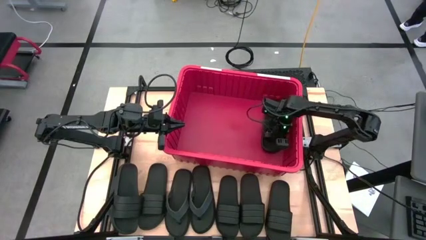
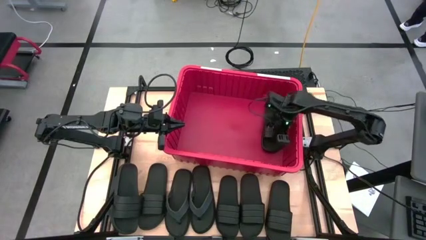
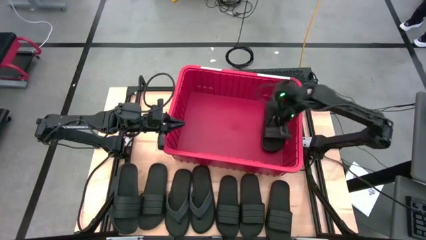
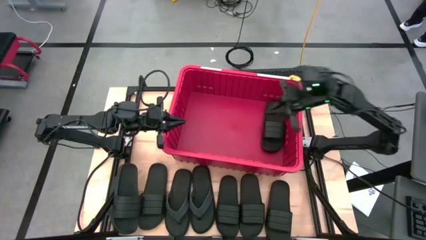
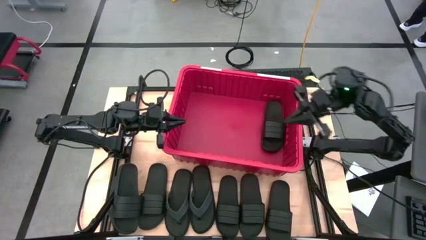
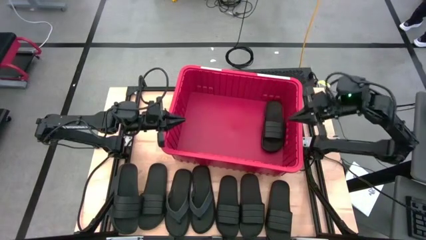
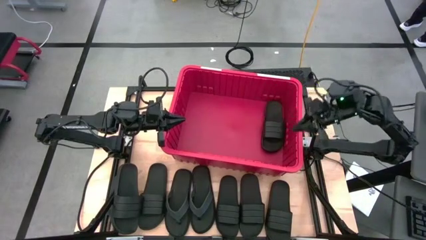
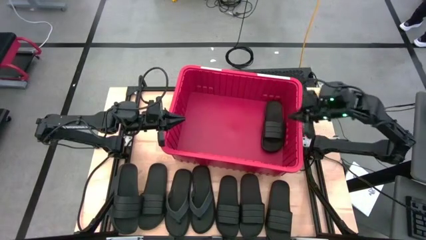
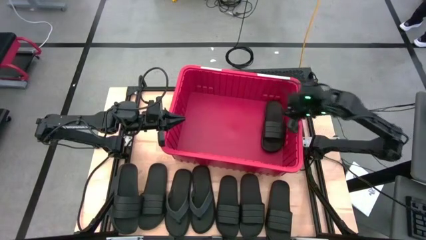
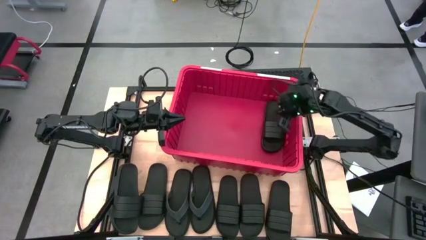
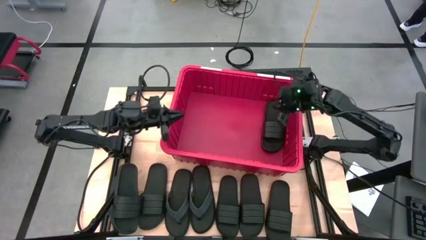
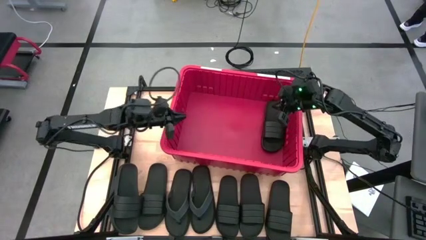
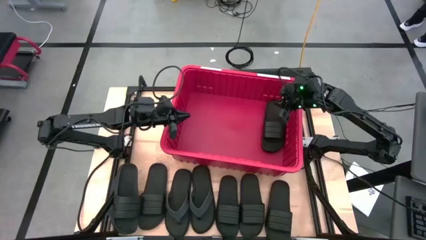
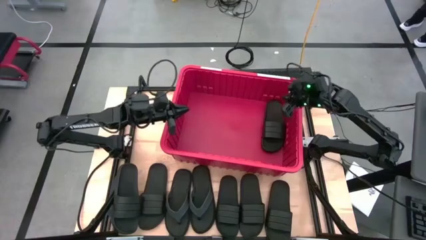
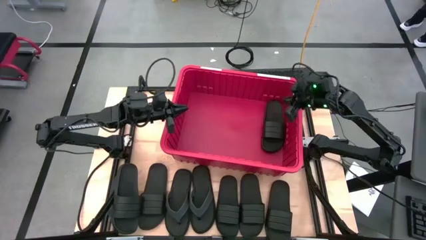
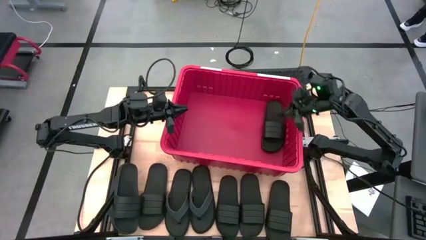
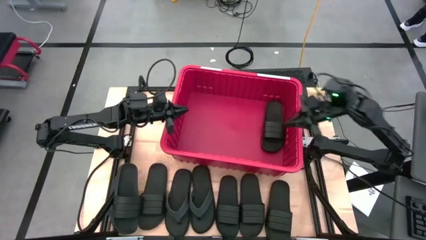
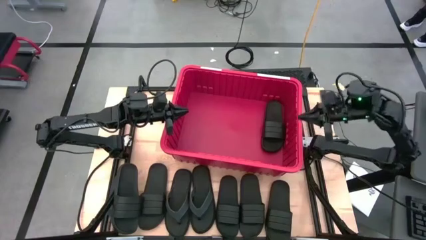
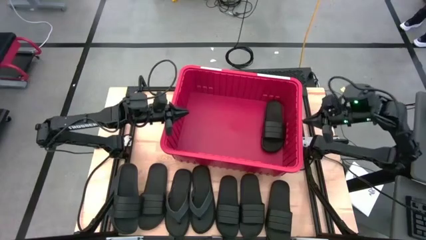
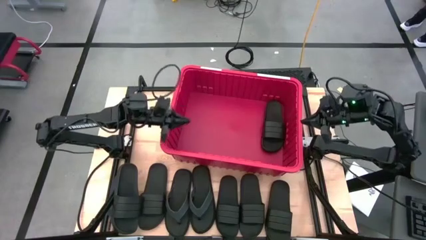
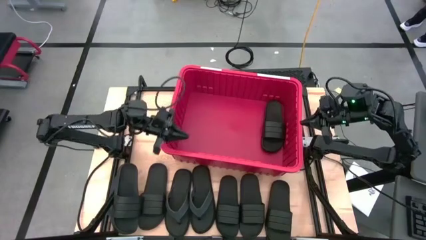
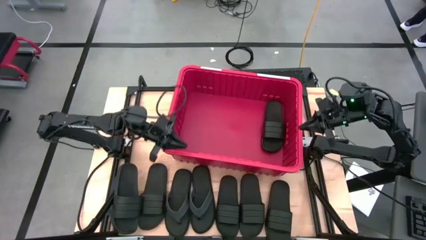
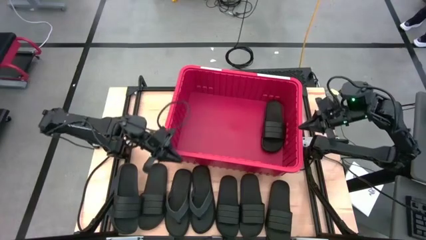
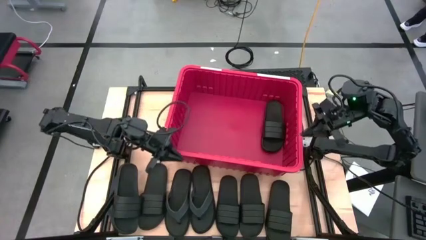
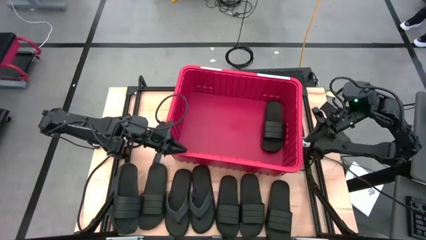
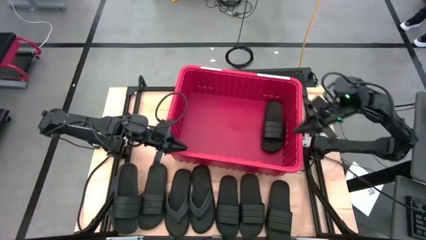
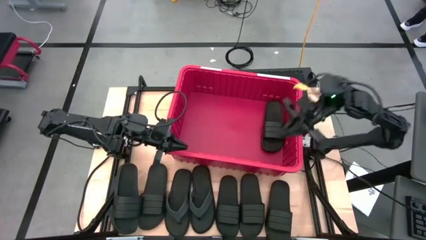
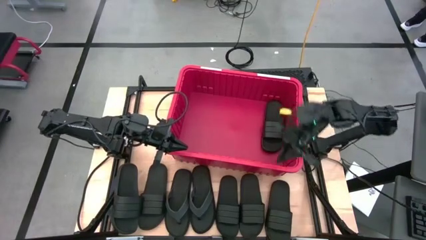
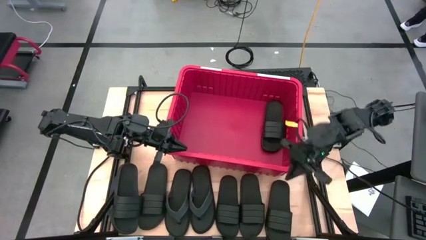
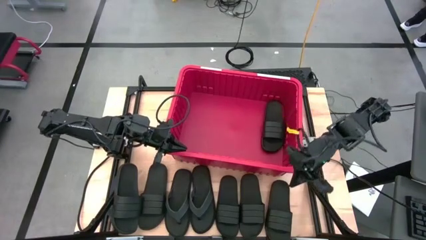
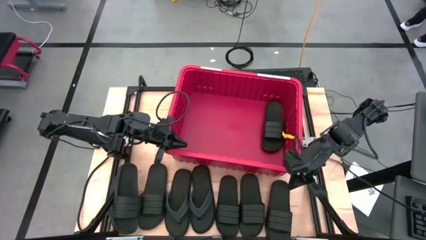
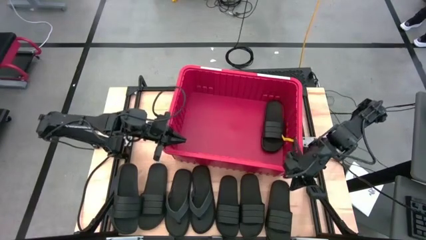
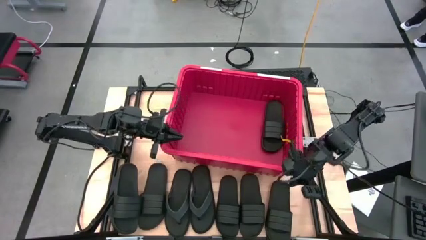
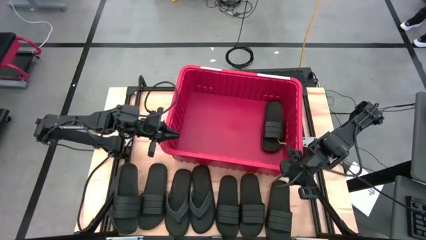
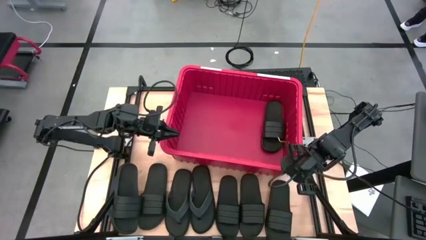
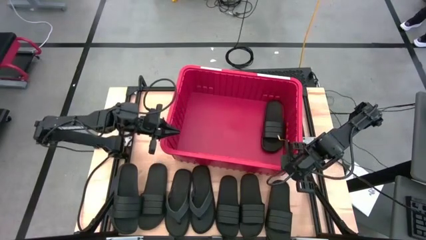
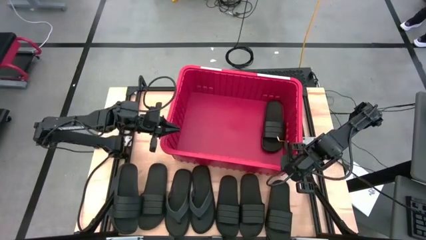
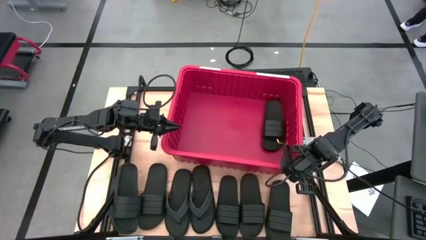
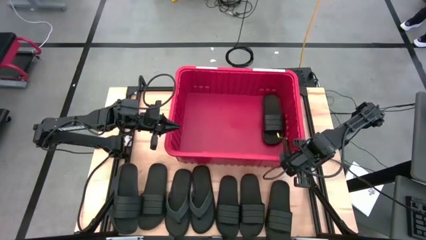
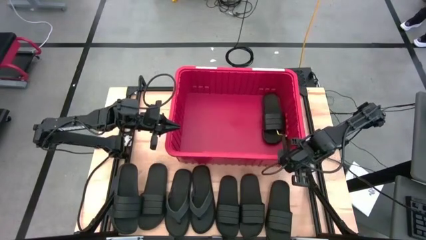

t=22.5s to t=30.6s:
Task: Pick and place slides into bin
Adjust the bin

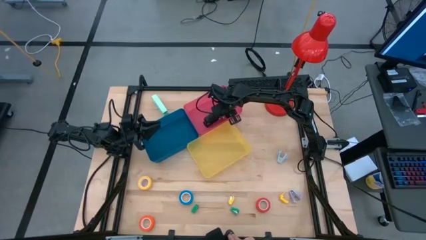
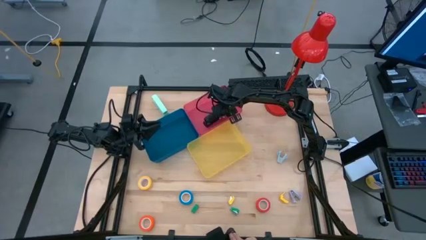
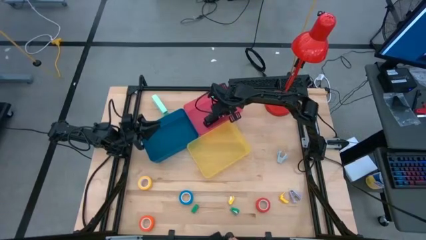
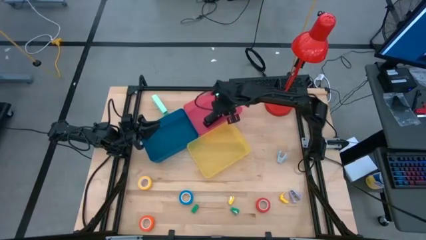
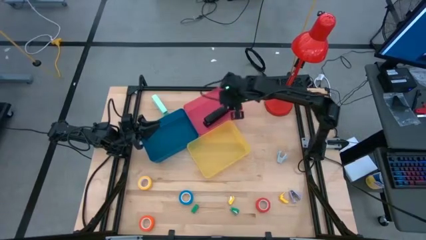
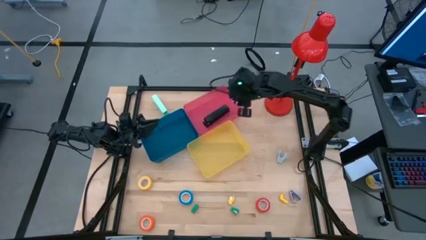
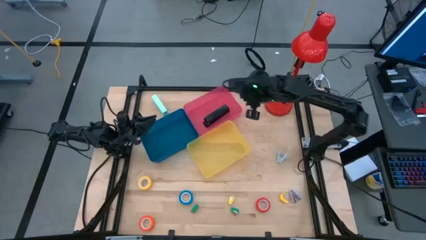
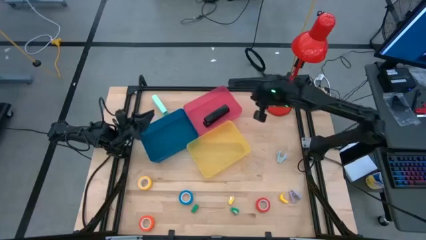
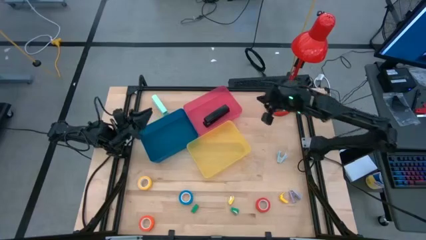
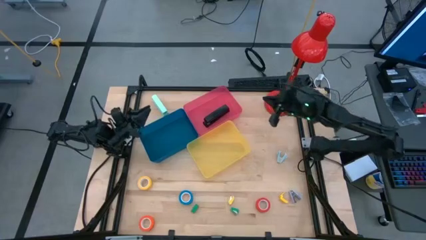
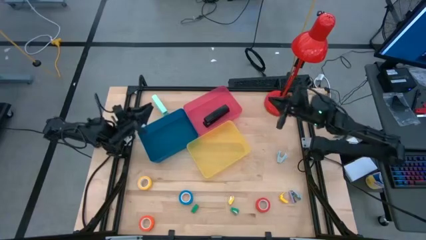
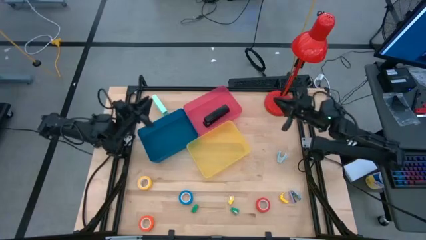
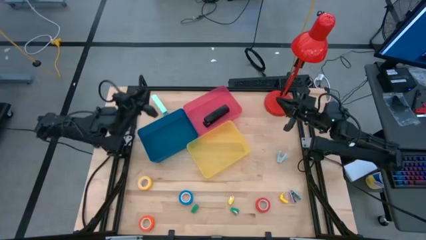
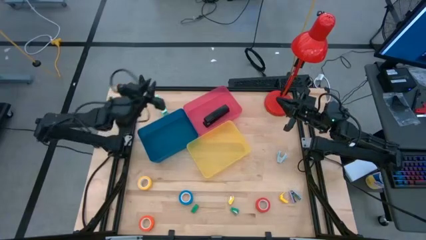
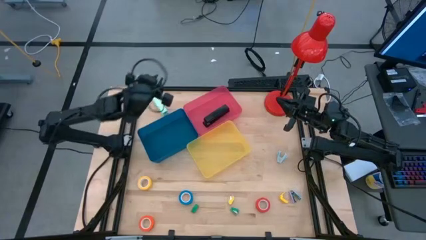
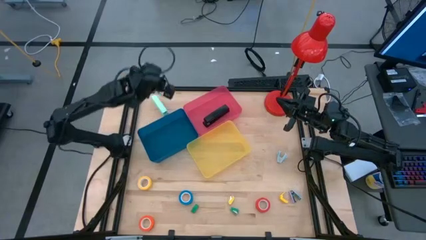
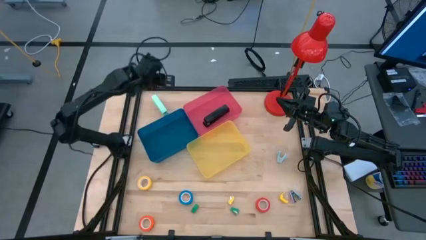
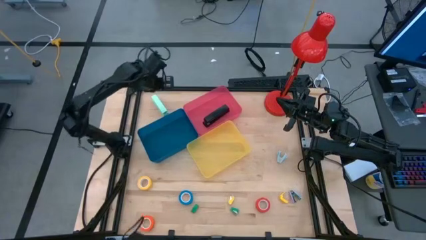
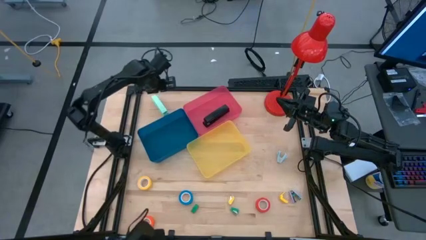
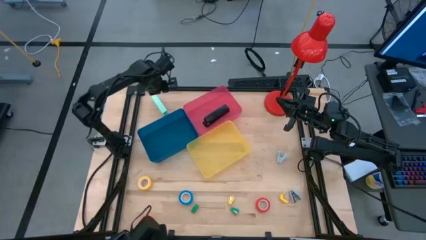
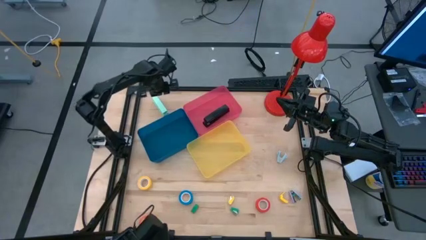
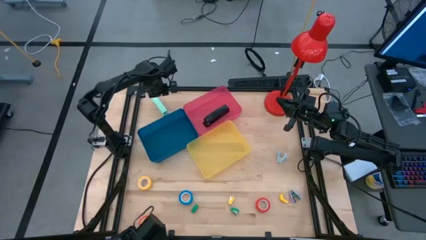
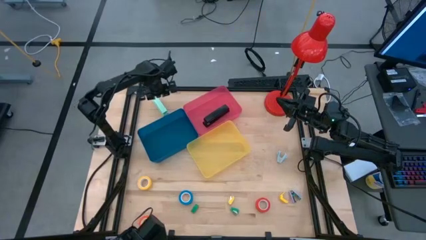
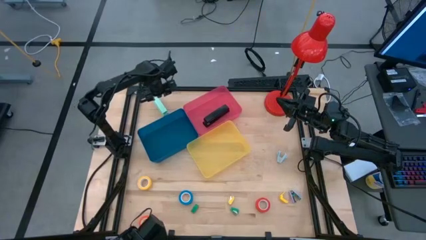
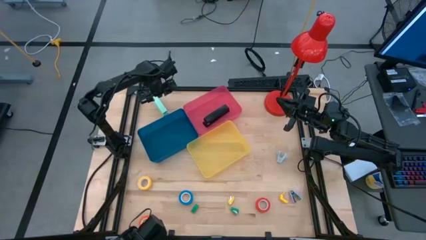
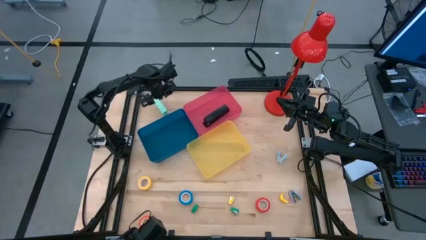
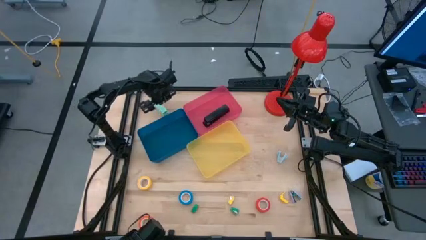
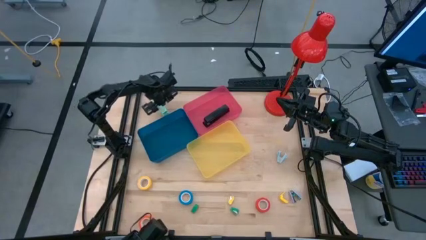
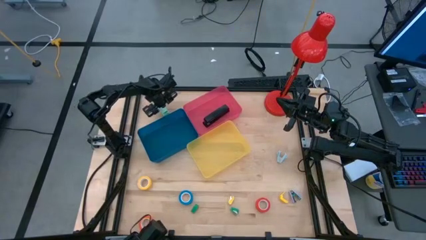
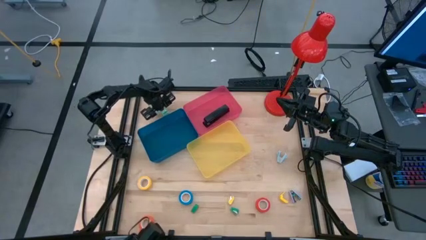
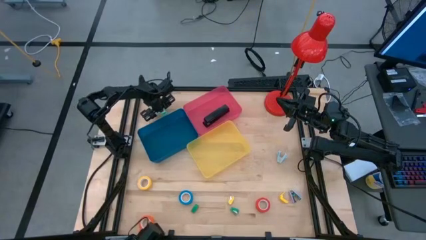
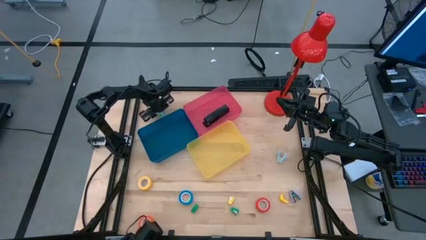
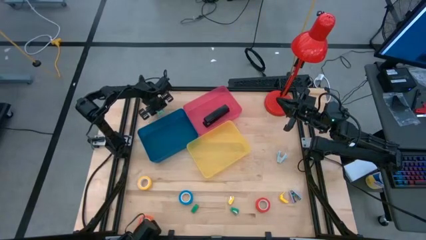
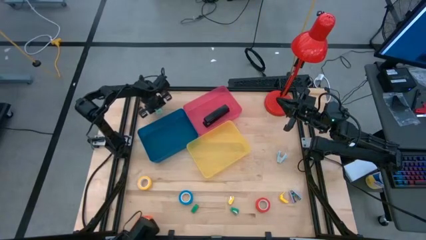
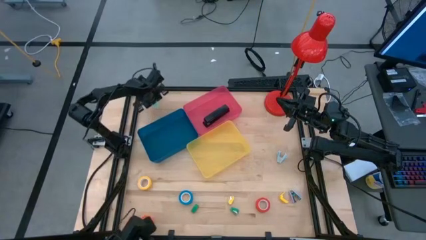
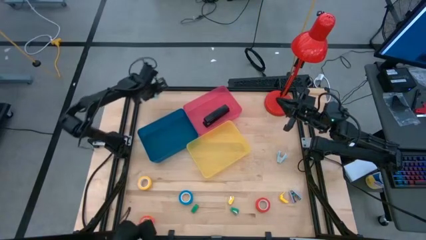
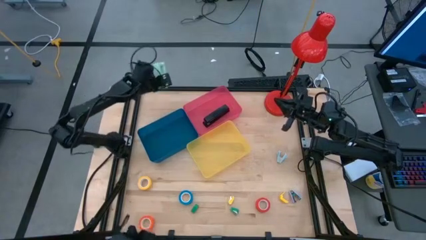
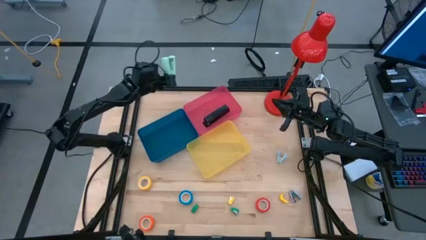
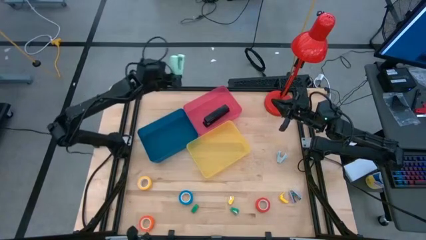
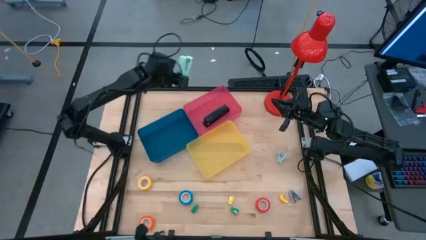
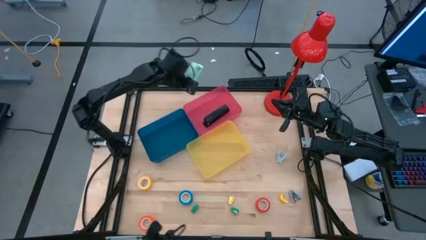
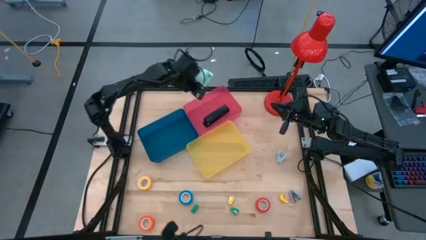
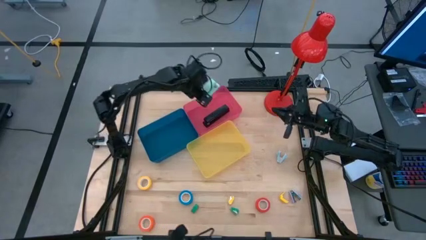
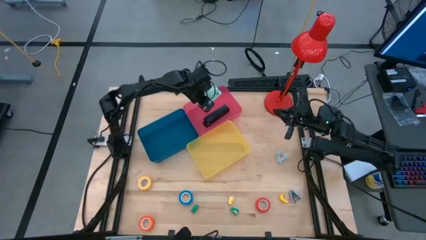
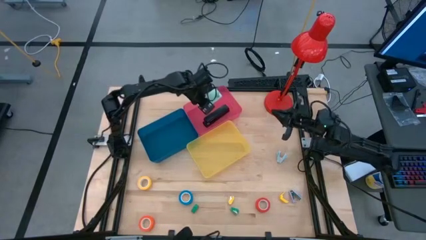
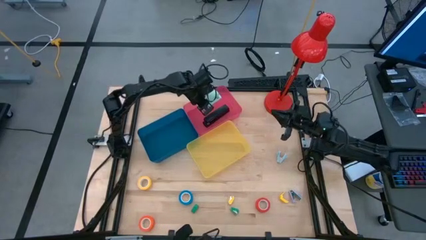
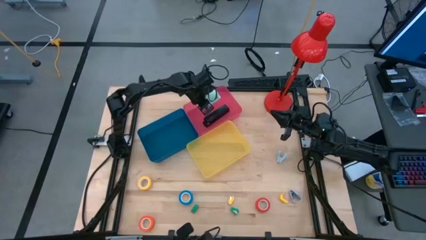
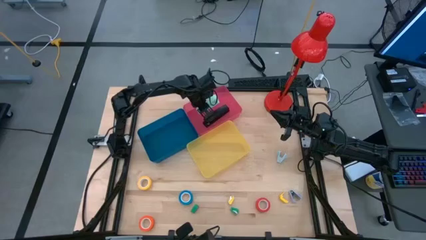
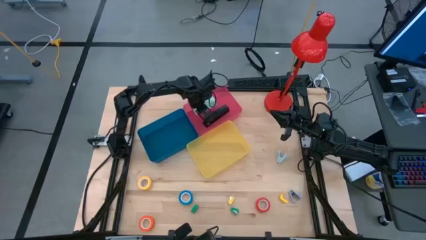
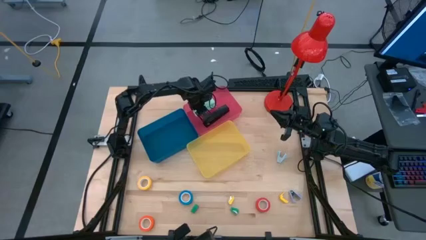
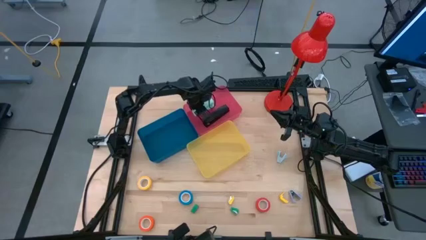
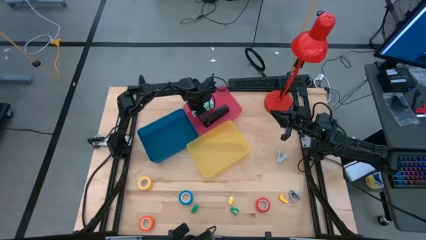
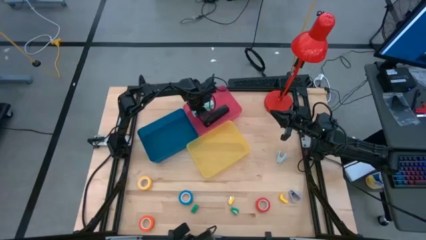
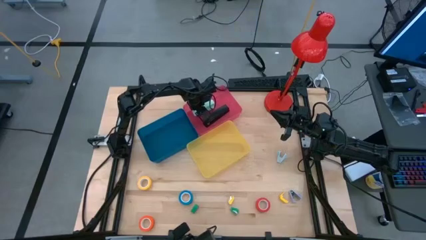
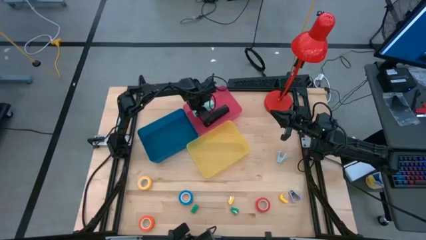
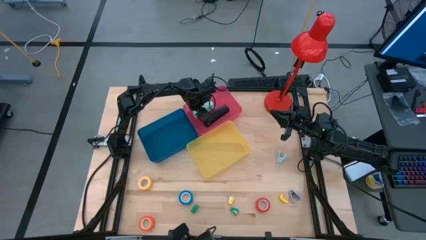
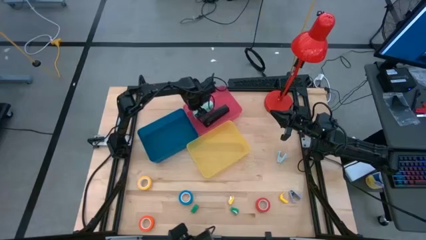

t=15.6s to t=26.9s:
Task: Pick and place Stapler, Stapler remover, tape
Put the blue stapler into the red bin
